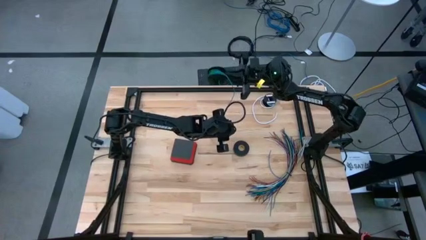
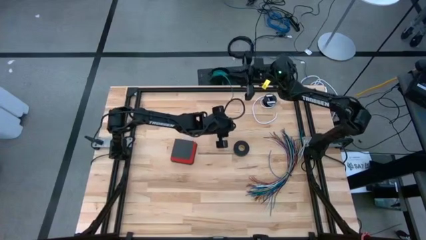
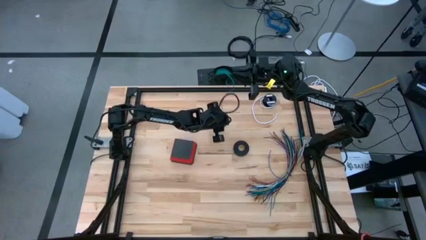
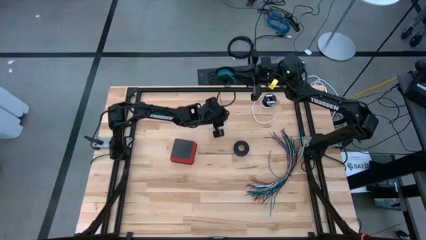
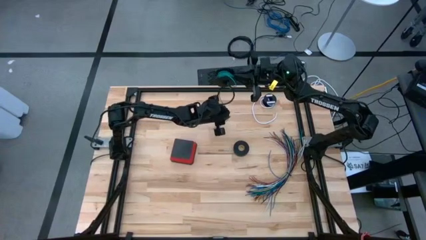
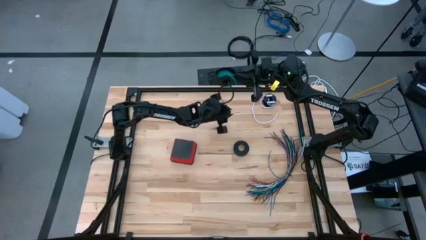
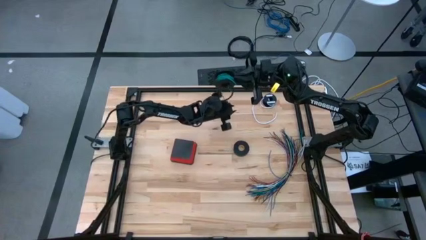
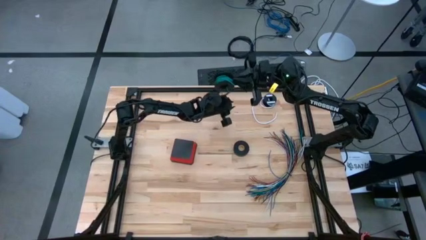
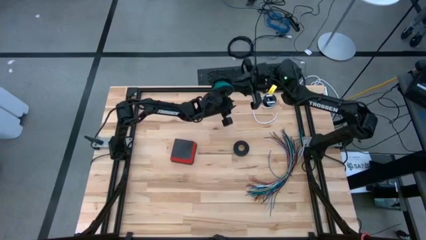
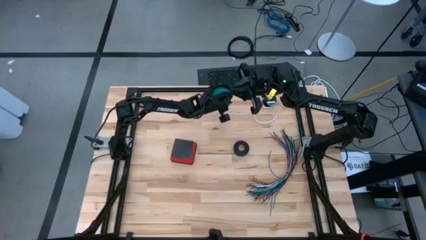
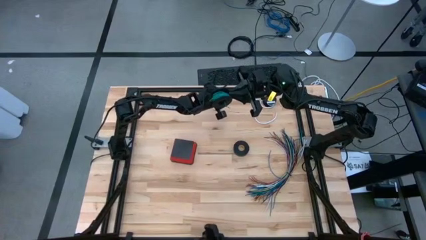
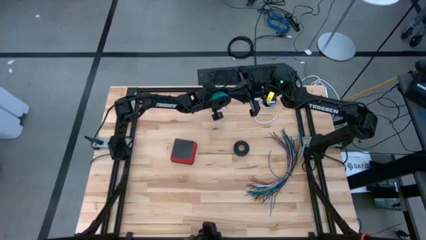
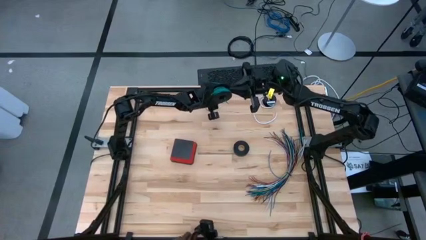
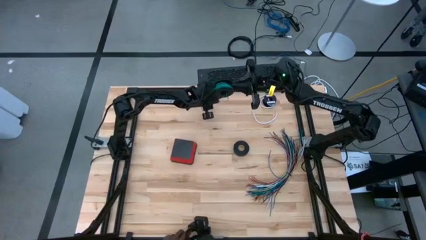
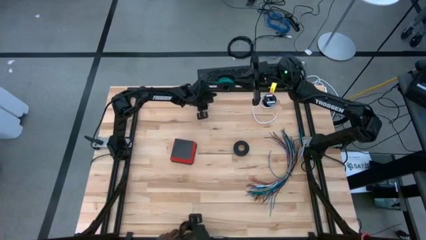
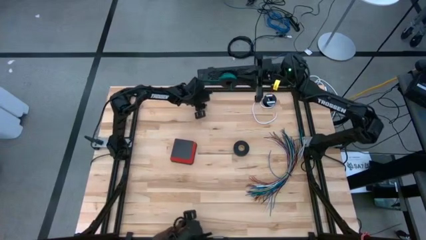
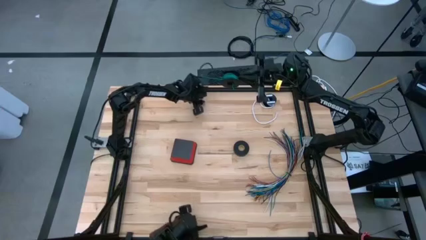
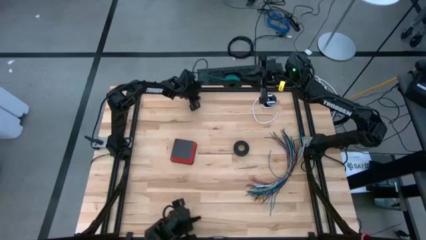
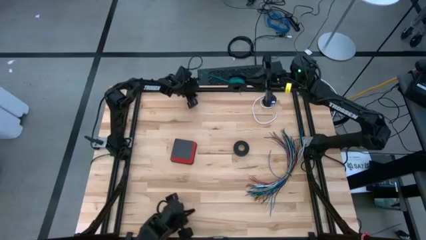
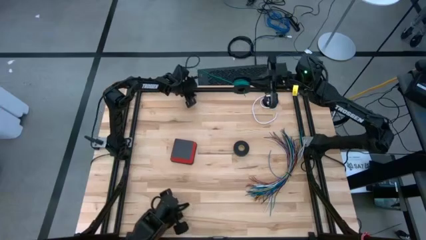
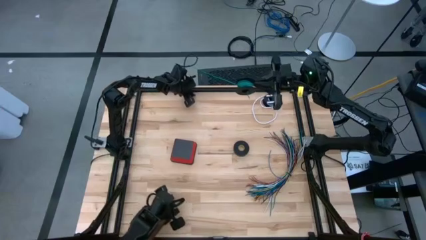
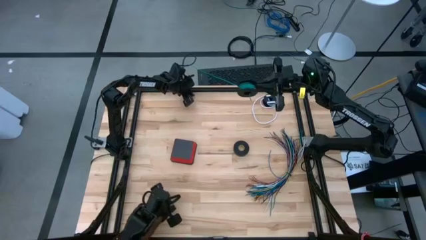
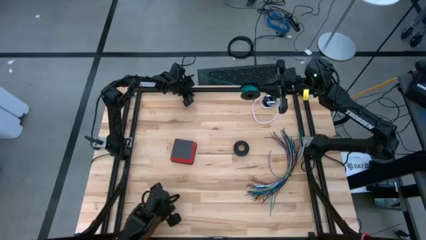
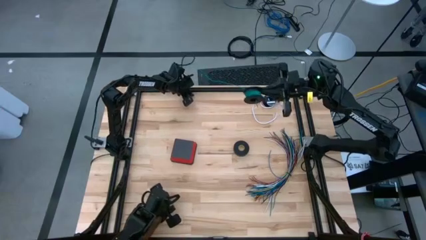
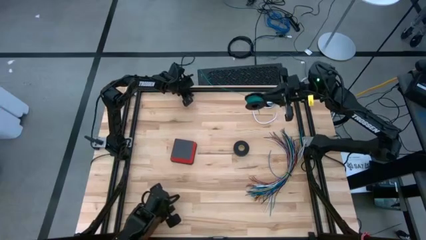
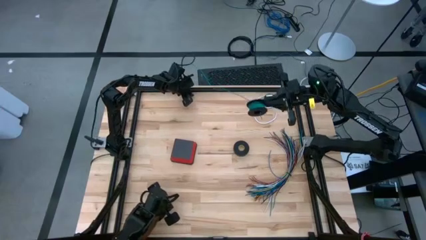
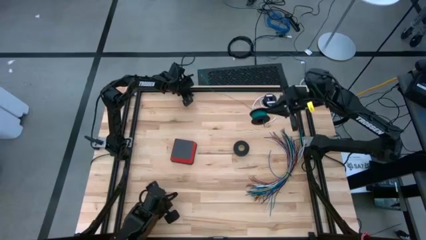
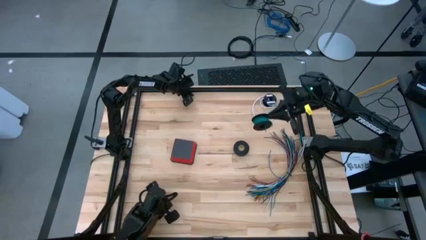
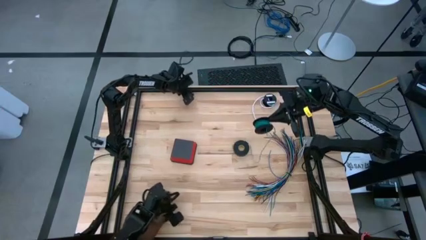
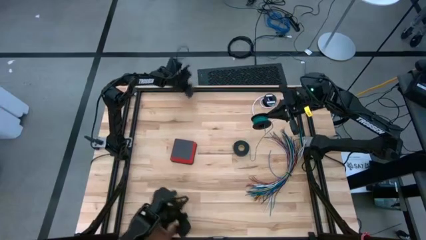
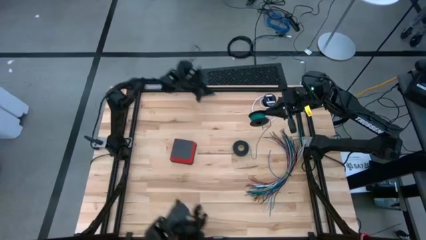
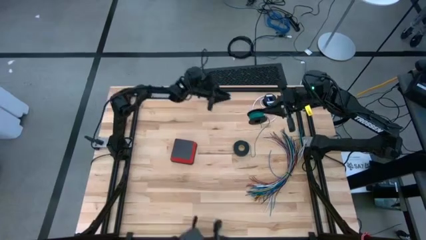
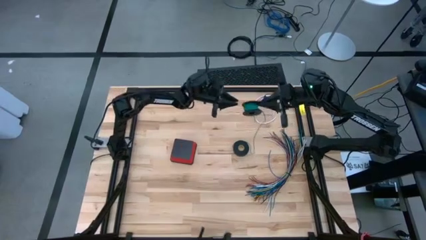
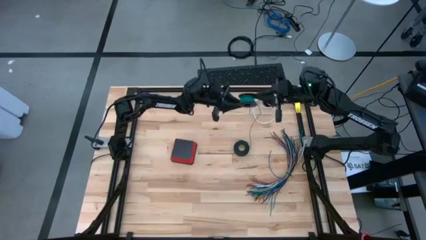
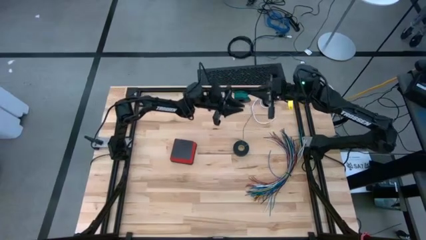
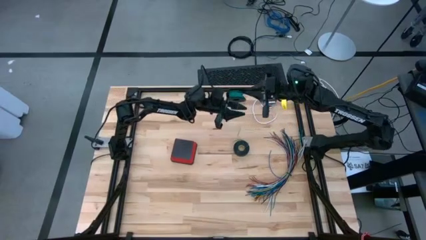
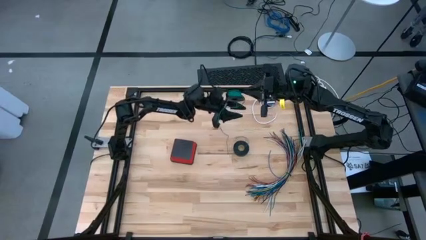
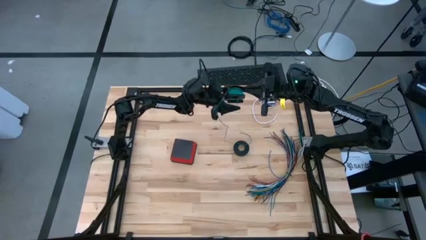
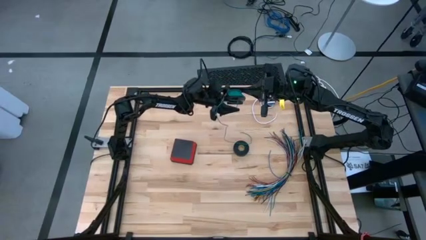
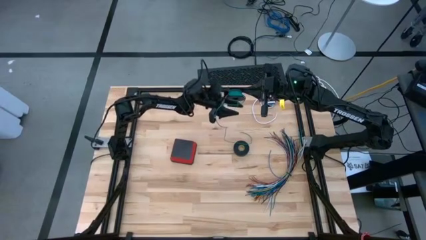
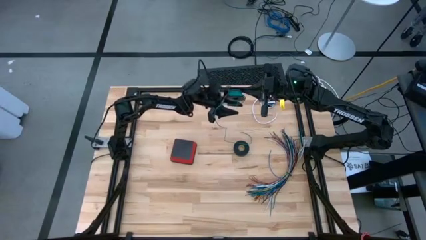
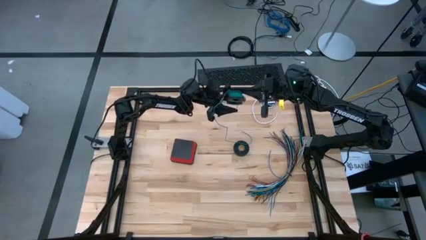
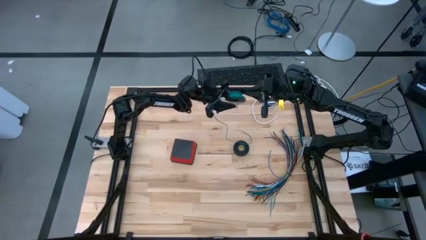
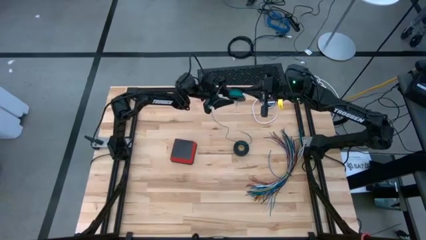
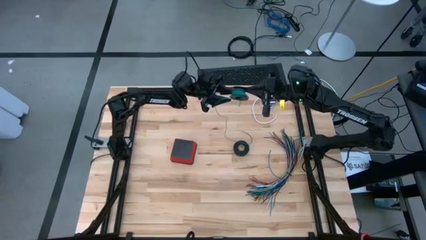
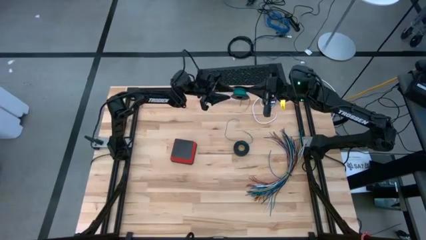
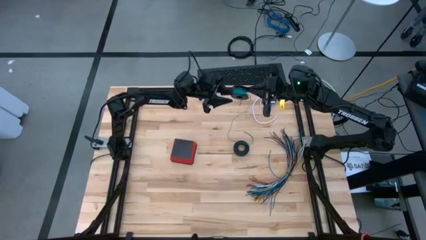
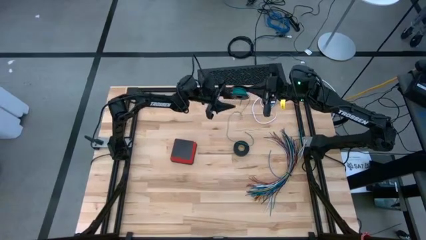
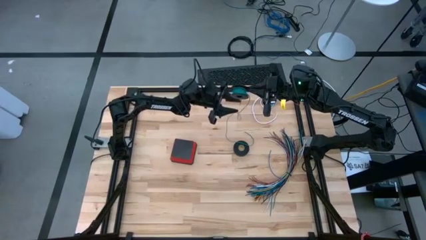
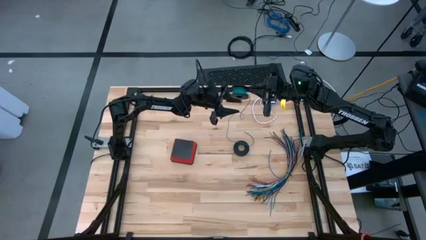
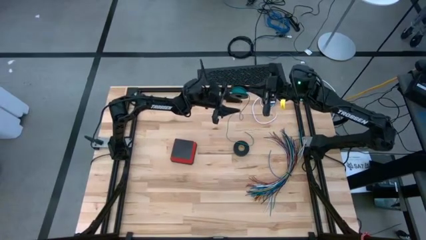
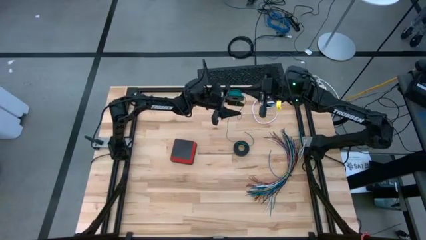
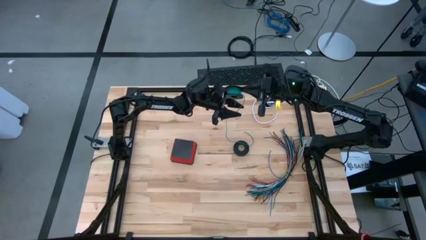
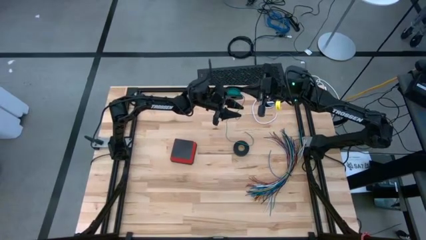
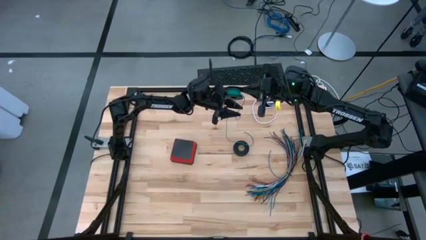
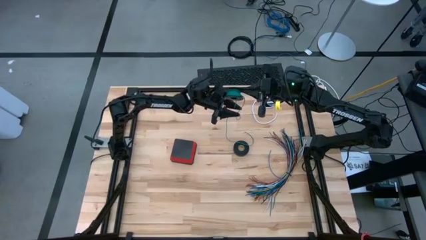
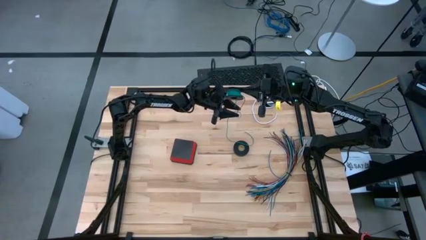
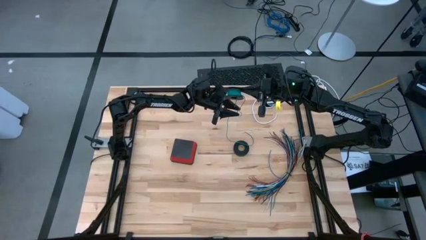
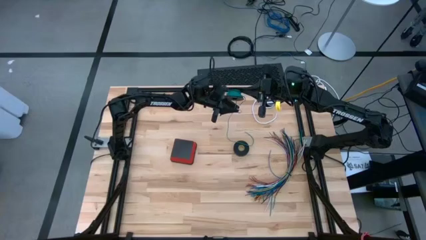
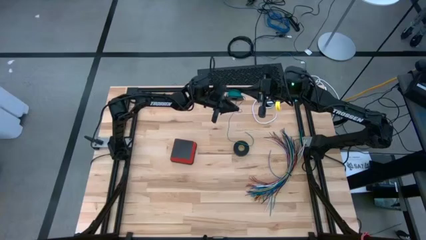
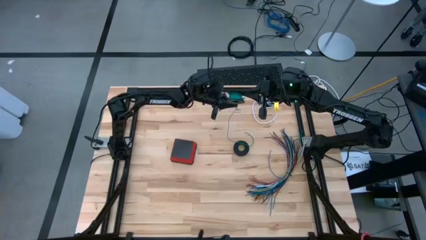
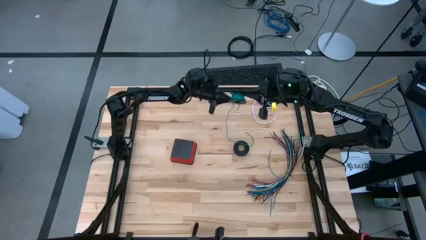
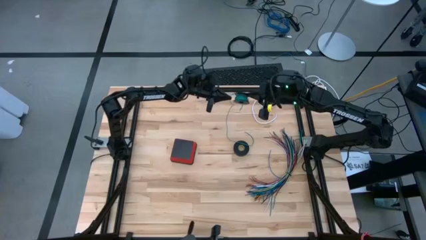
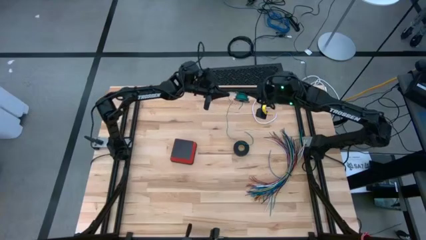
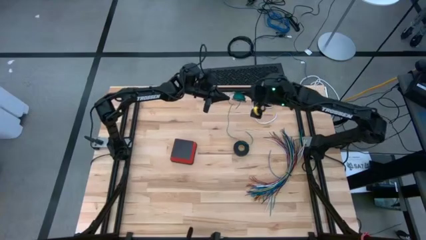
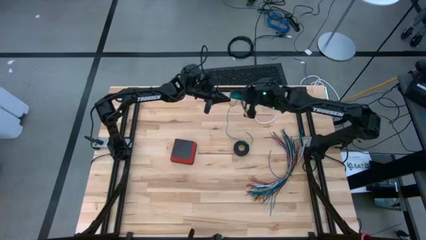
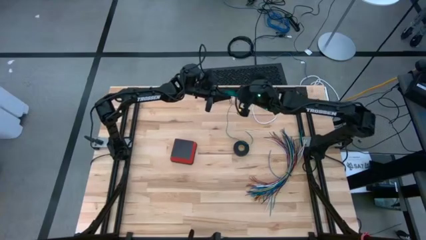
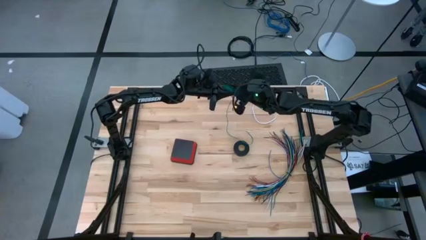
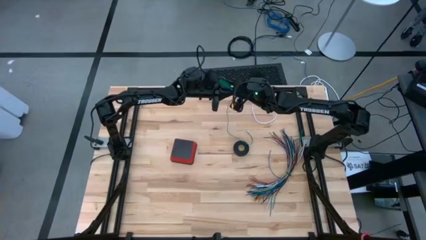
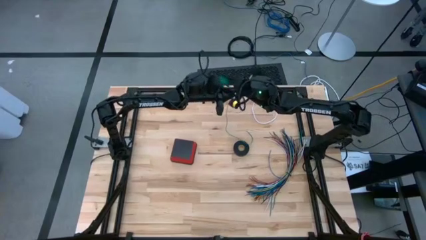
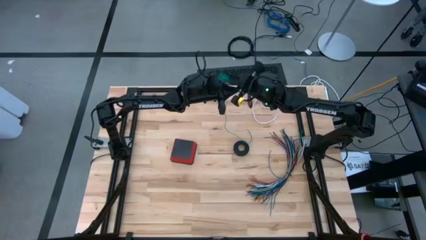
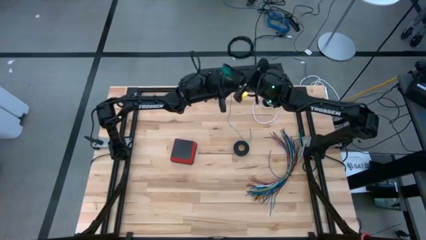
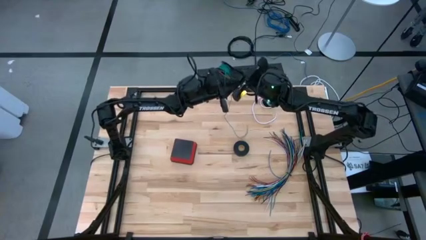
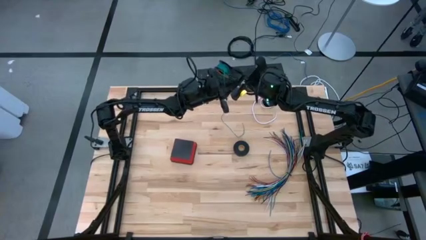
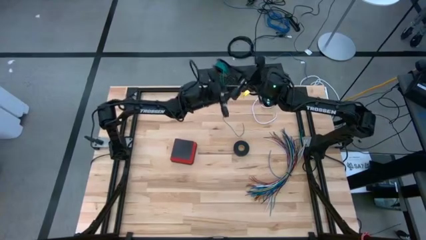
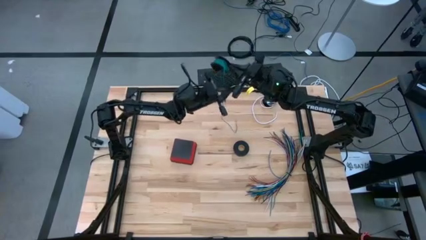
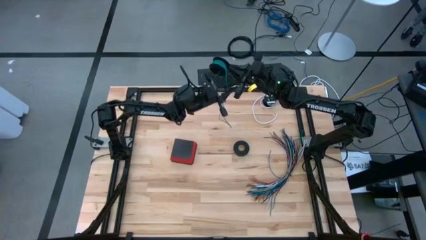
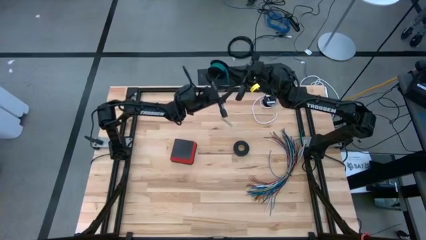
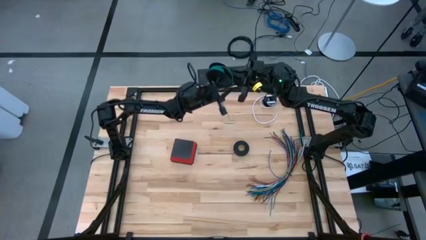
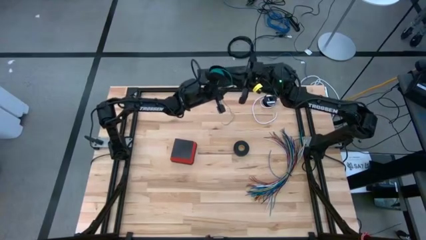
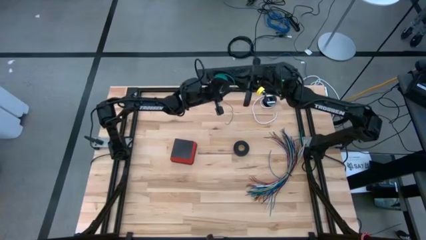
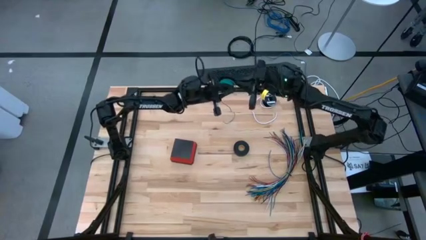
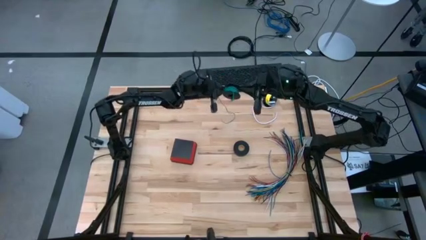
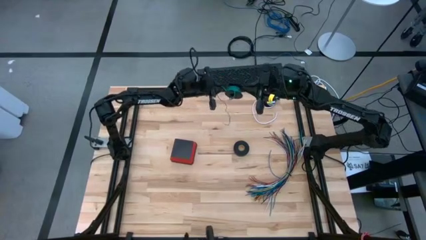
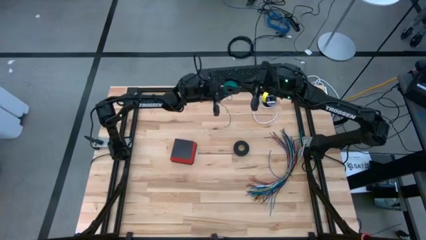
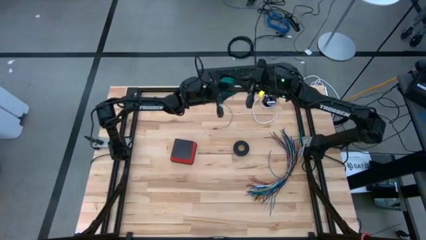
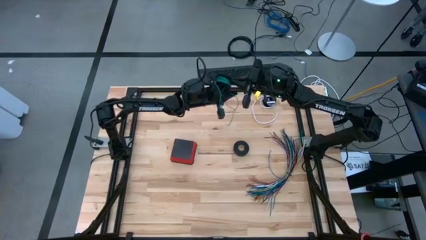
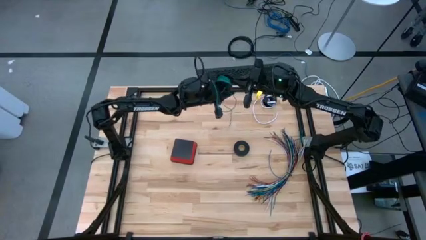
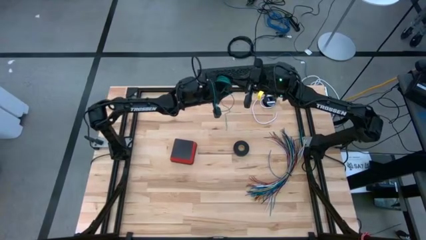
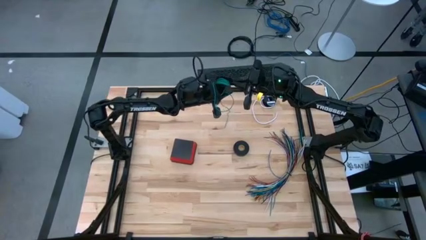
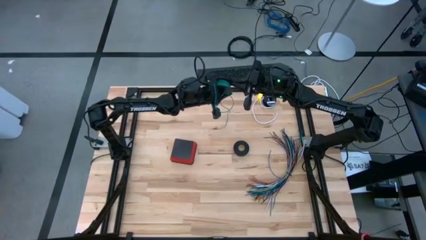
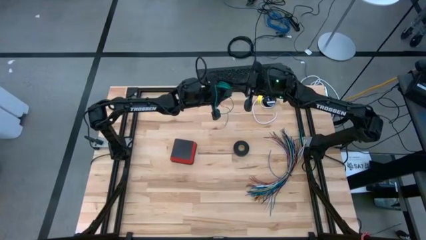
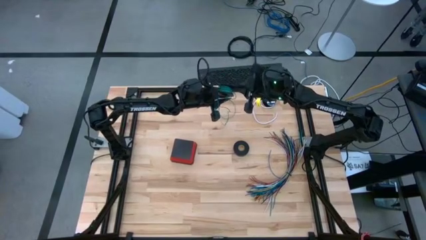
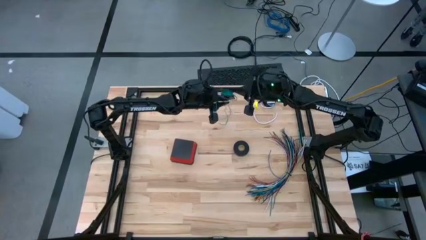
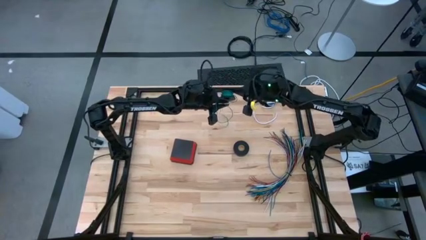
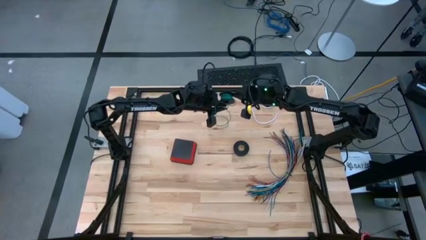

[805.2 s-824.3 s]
Task: Coiling cords
Coil the green wire cable on the spool
